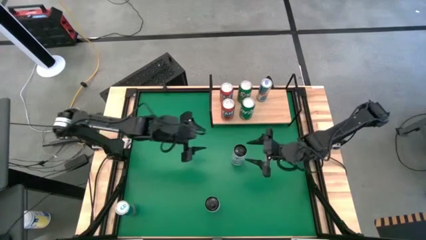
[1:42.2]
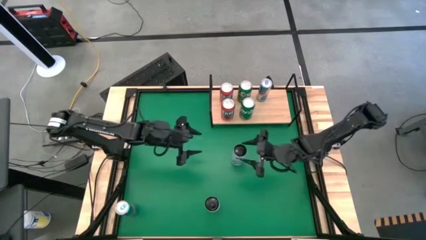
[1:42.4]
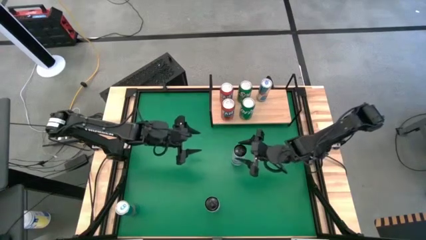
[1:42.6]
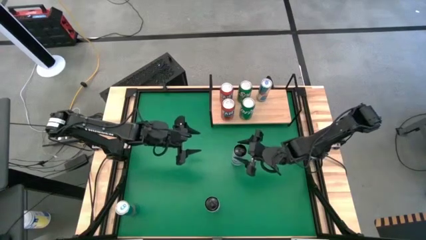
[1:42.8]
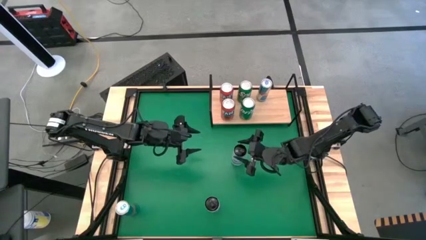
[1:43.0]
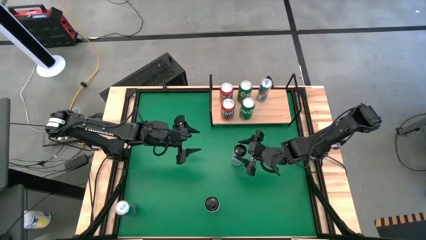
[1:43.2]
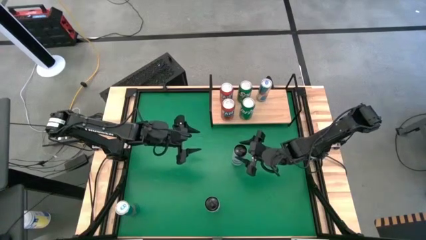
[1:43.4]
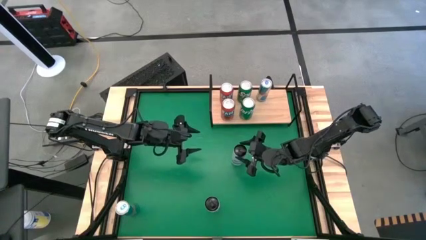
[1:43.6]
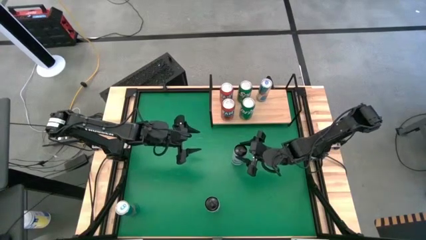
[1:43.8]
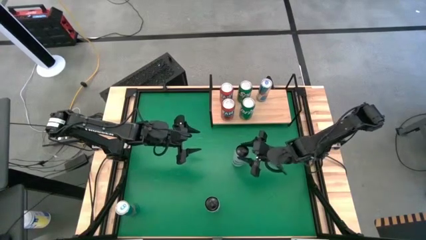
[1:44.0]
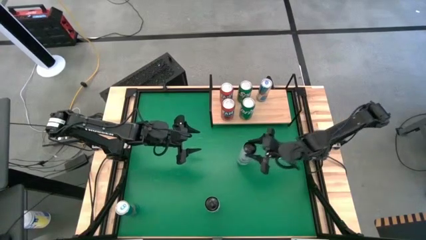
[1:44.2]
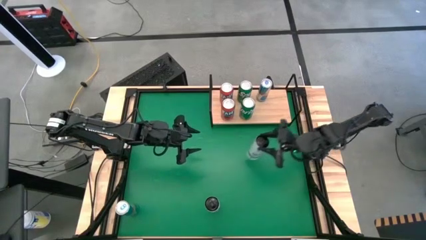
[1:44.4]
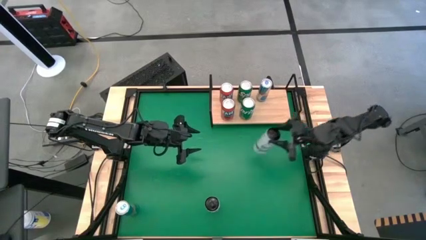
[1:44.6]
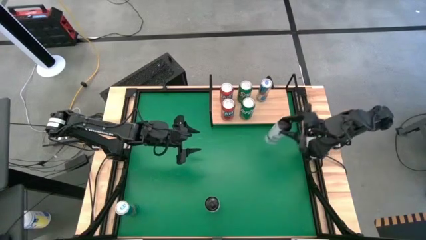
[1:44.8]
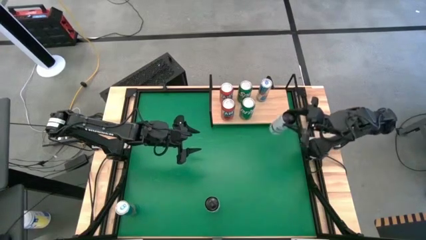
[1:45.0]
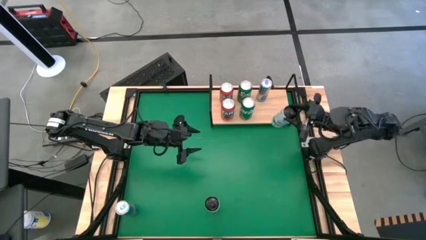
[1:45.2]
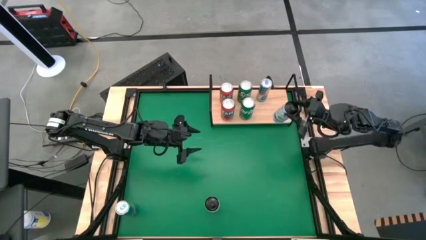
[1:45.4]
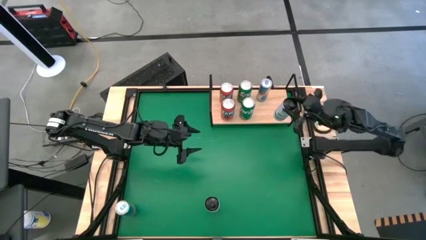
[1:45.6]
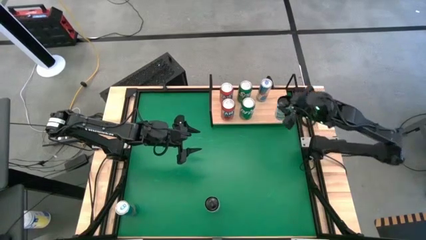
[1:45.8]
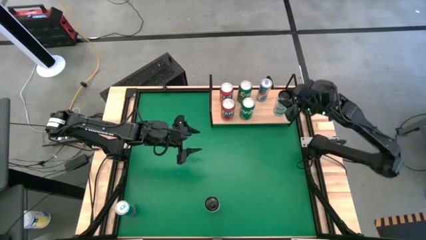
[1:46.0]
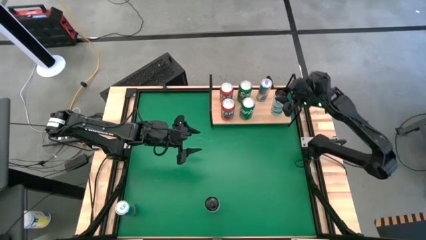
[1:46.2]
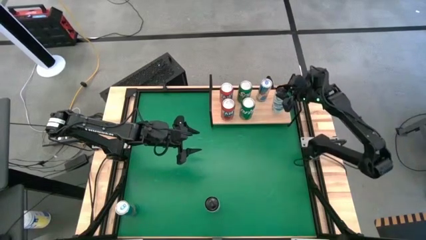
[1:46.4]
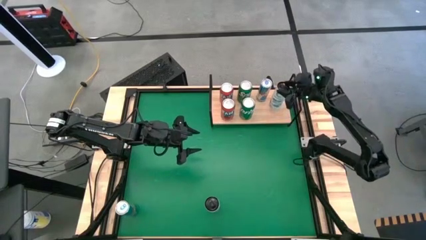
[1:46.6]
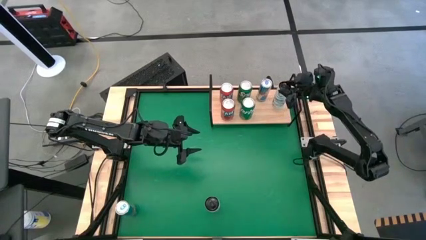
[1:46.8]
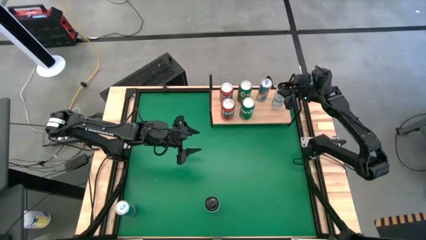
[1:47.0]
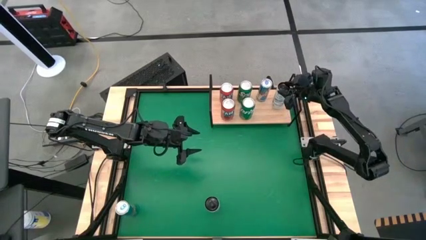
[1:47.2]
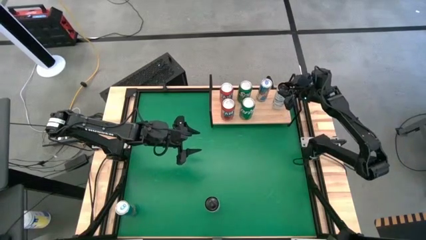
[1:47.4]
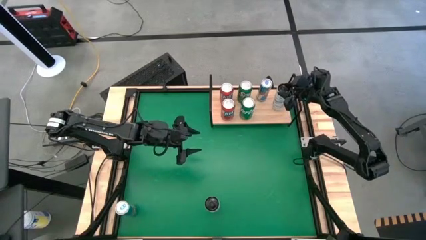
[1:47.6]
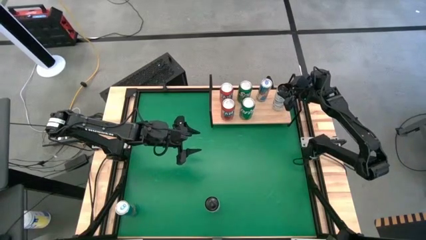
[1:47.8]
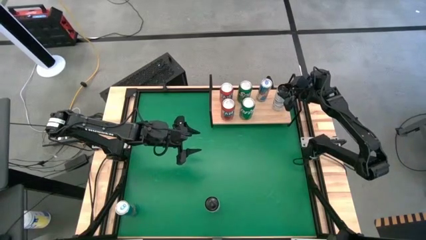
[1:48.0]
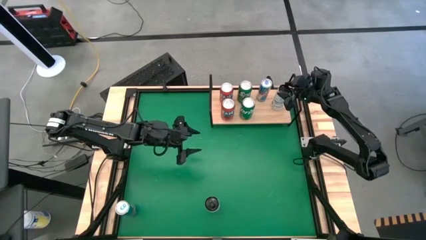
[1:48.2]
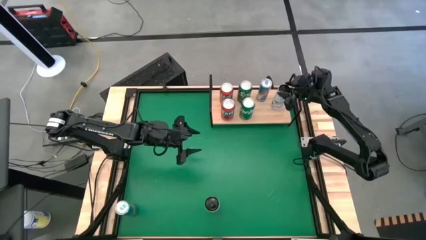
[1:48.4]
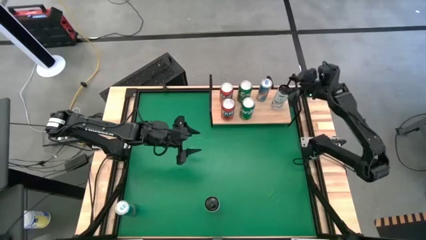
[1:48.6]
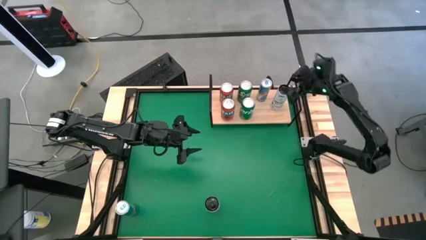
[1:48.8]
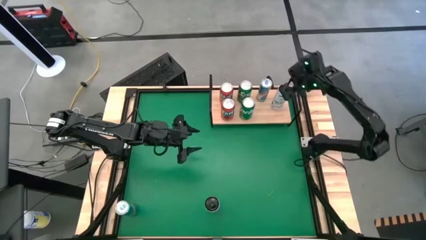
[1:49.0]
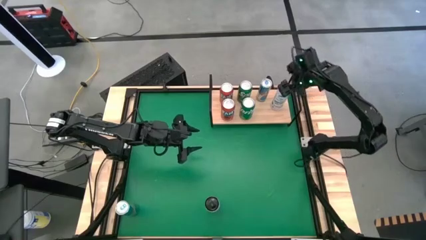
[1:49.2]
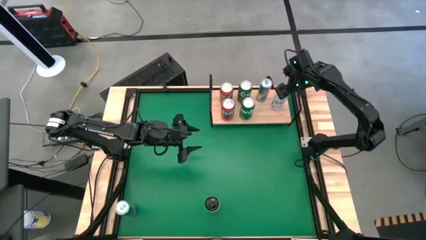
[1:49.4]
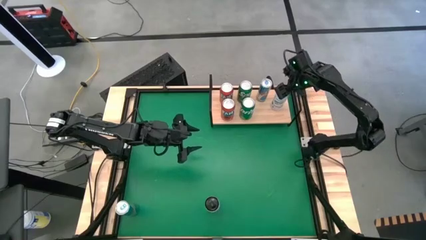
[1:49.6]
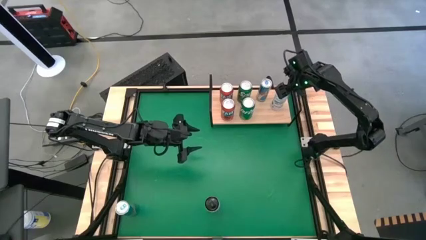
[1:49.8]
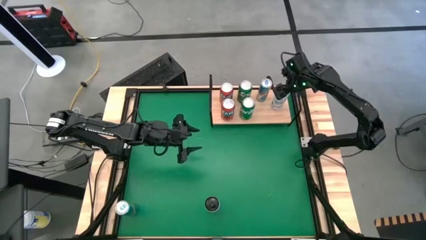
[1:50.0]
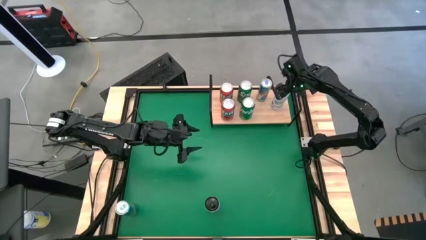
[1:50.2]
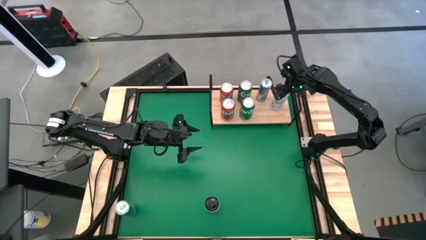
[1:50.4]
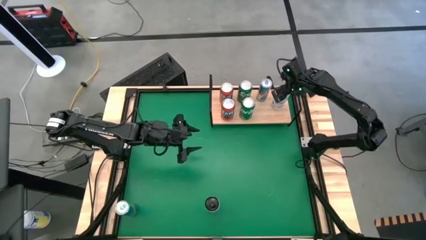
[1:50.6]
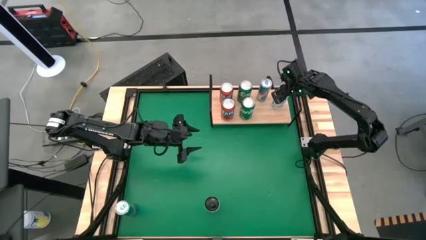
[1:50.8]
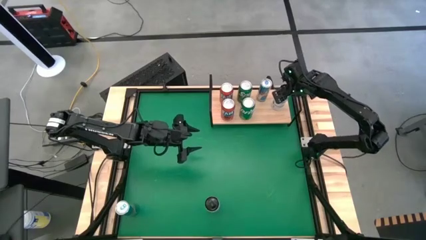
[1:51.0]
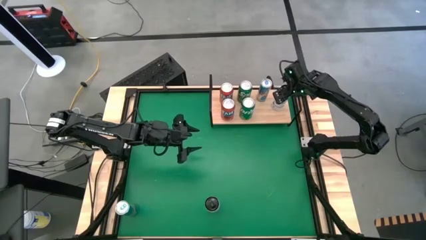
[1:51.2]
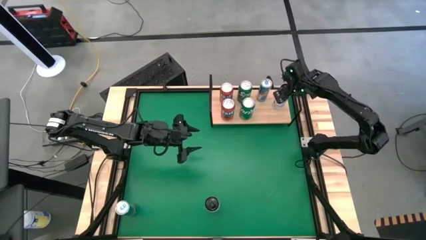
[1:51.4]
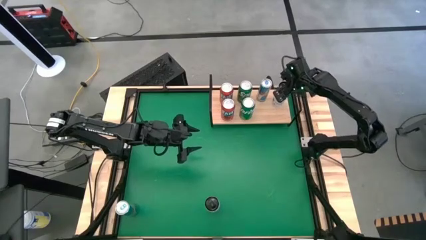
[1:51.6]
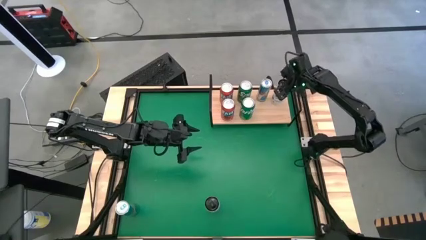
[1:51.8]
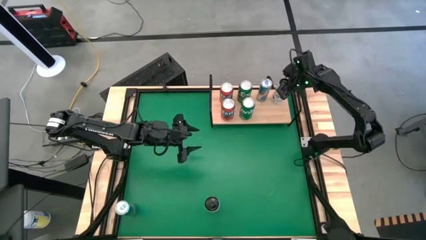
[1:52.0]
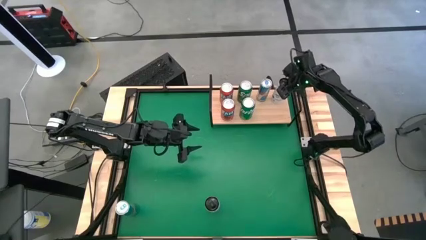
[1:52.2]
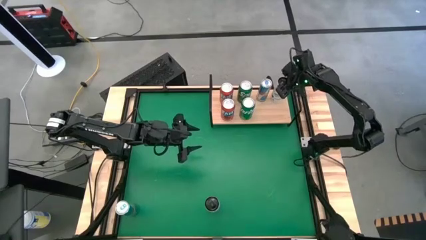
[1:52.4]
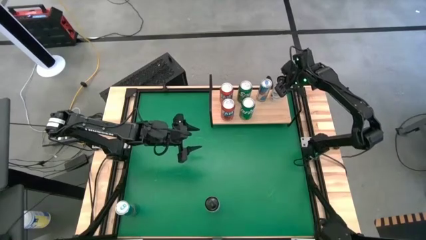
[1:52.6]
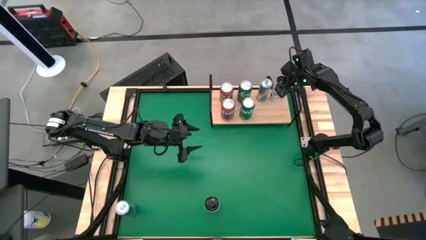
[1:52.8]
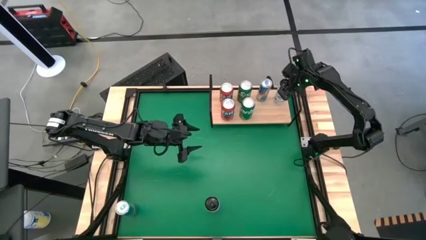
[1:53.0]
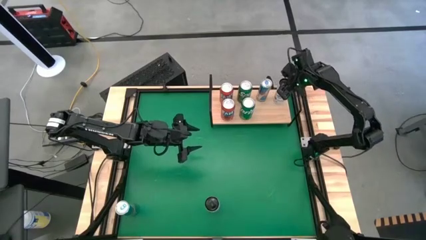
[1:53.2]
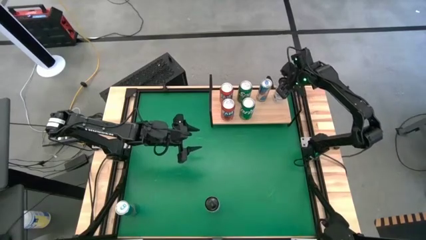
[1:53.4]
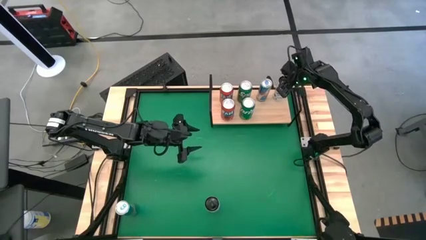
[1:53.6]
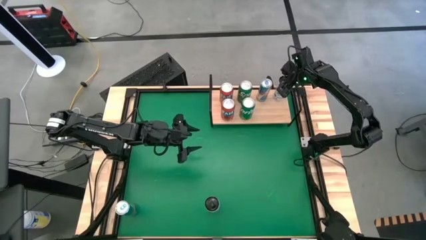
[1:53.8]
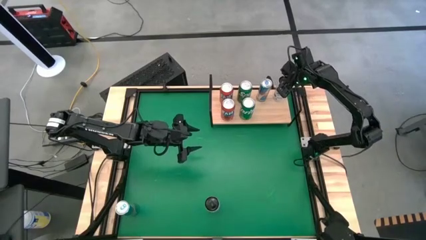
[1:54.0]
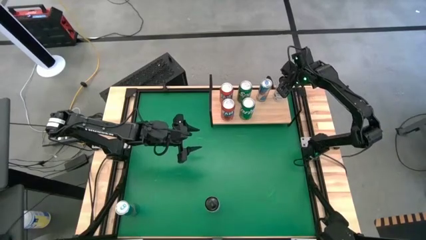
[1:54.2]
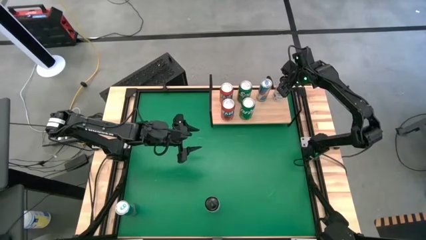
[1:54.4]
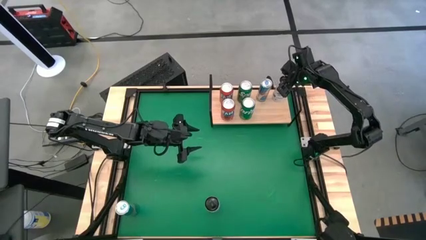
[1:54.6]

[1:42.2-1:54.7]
Task: Place canned beverage on shelf
Put the top white-blue soda can on the shelf
